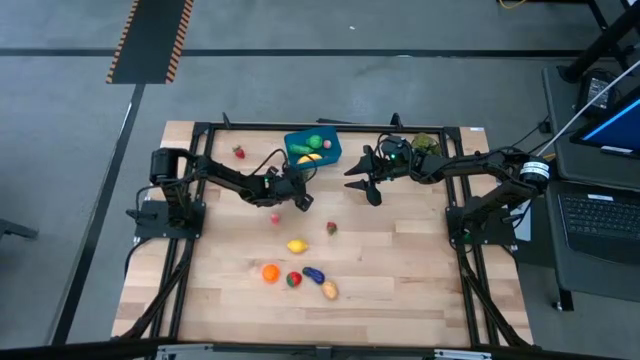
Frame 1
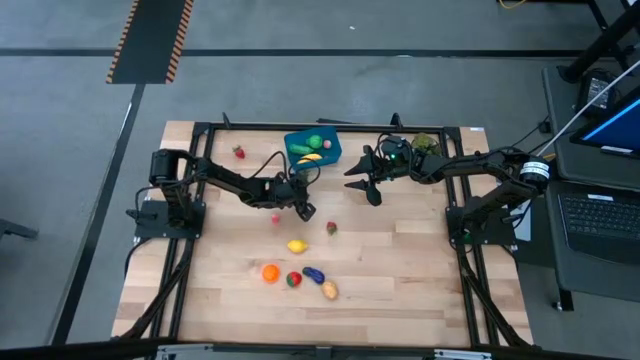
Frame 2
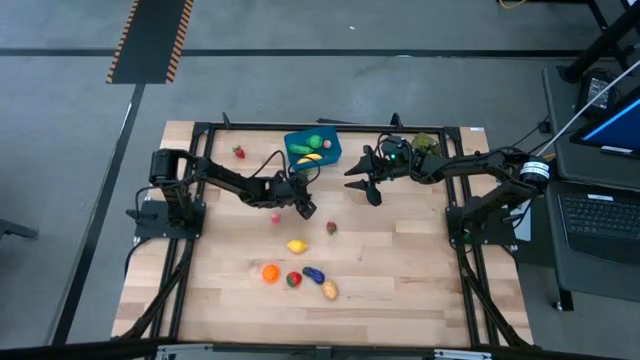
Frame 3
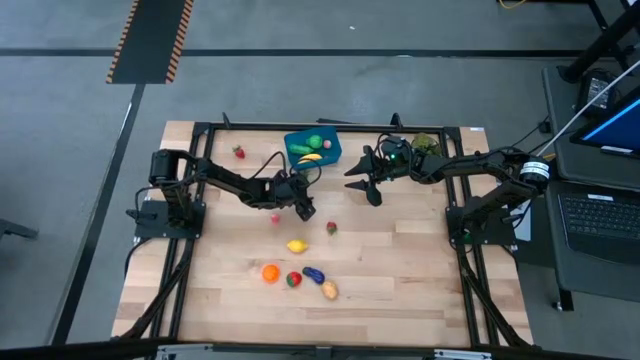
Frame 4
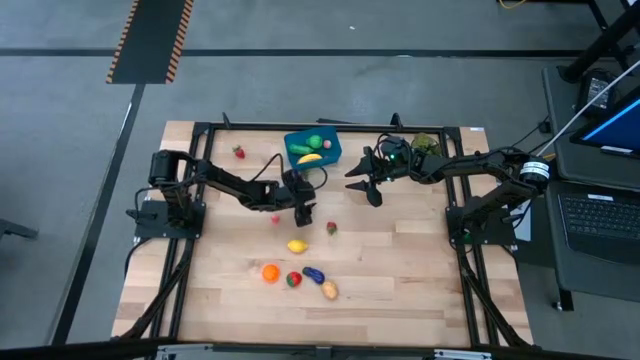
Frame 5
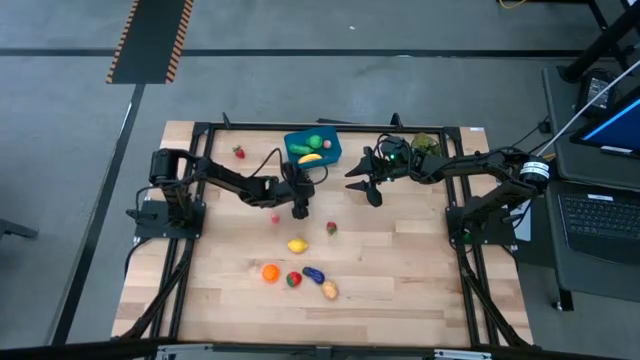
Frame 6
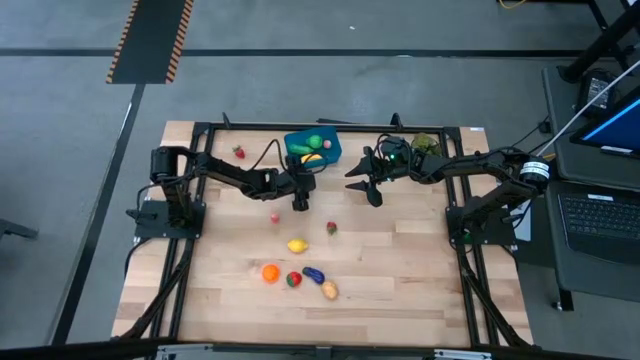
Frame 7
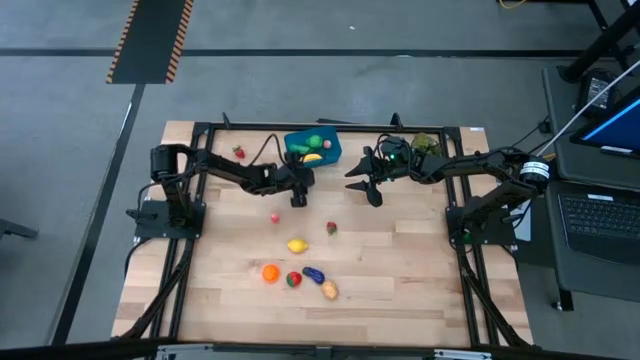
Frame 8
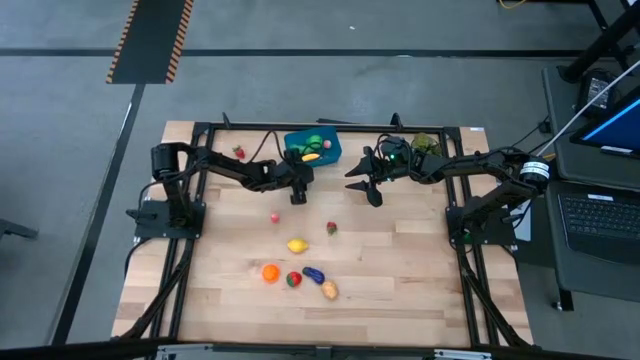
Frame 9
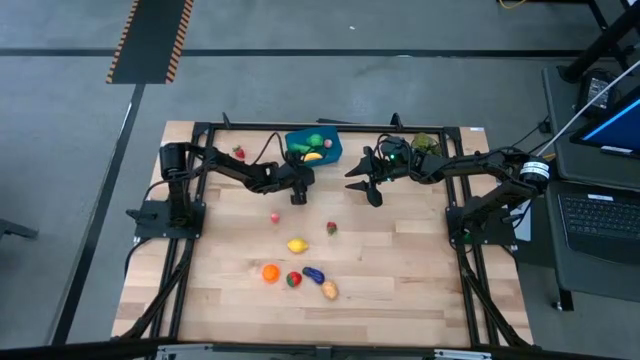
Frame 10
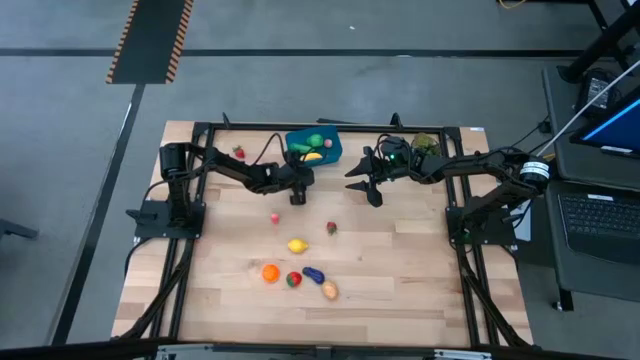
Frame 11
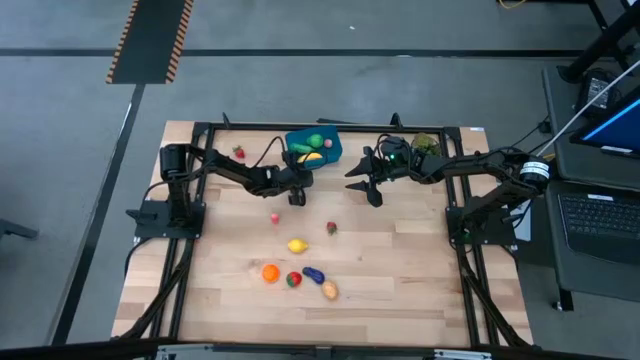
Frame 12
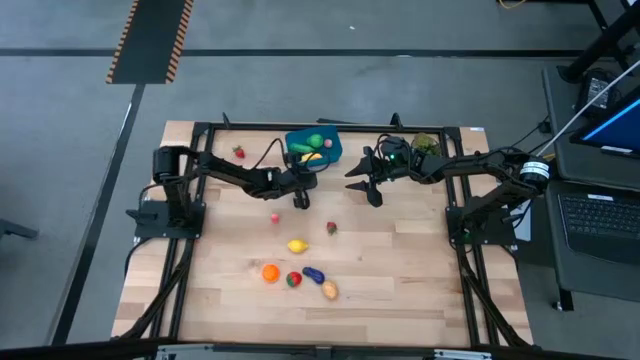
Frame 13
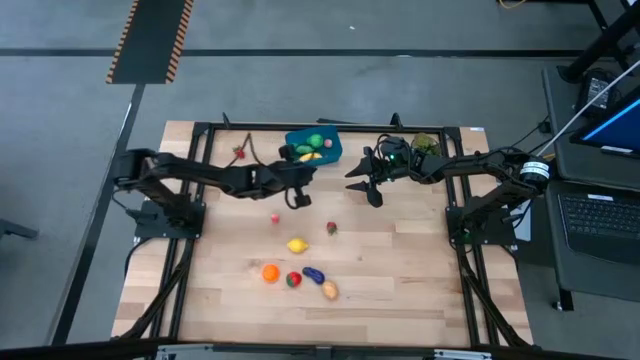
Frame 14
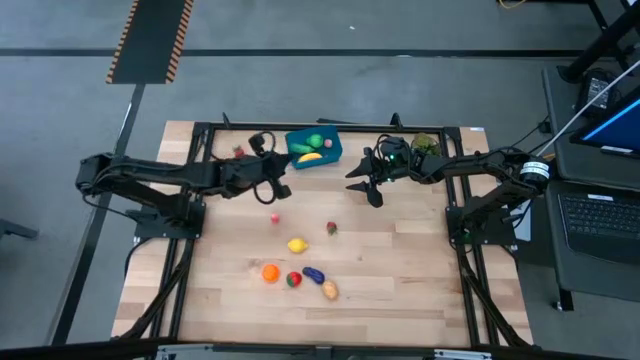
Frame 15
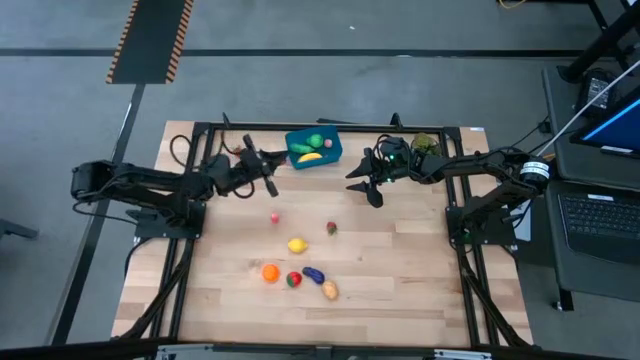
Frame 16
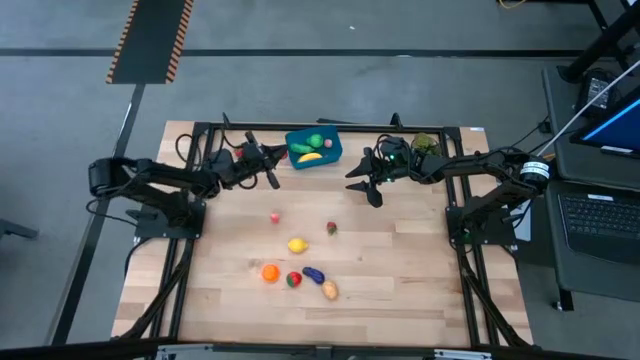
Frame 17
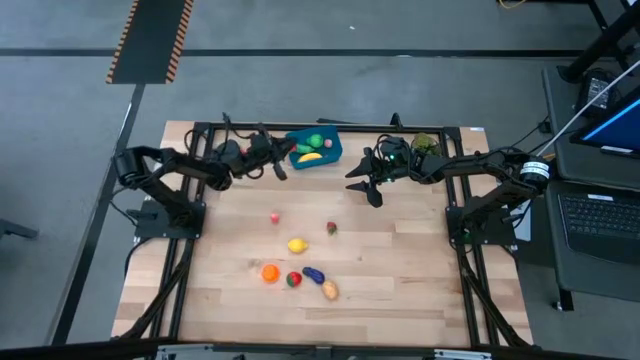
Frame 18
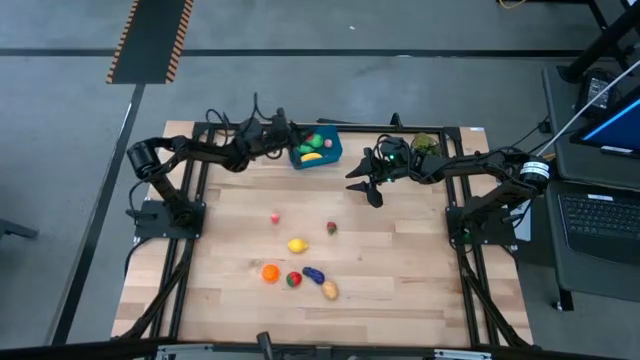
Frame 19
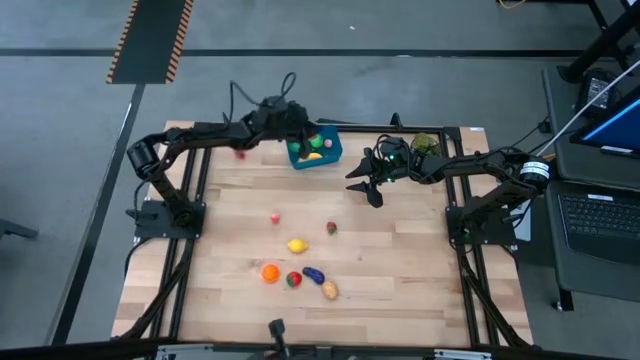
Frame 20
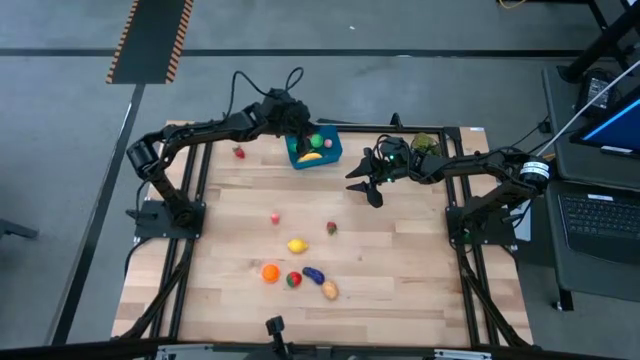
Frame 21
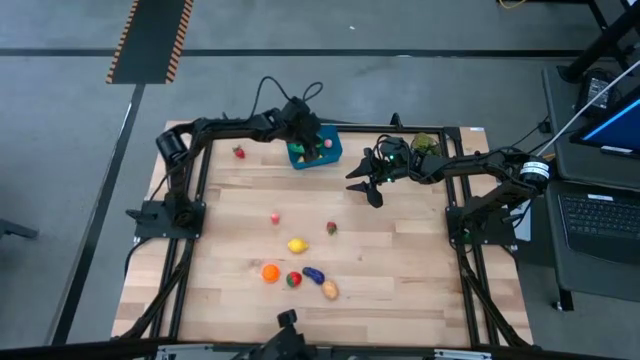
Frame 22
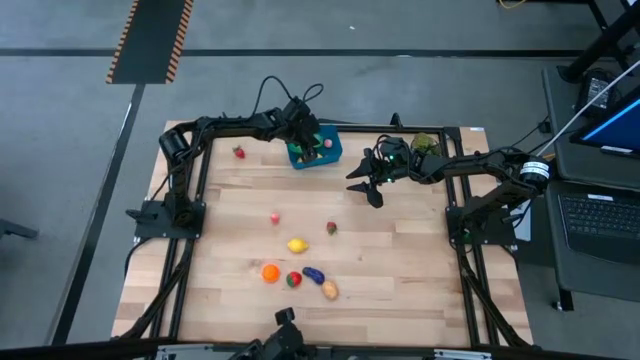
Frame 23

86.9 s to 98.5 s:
Task: Pick and placing Produce into tupperware
Put the strawberry into the blue bin

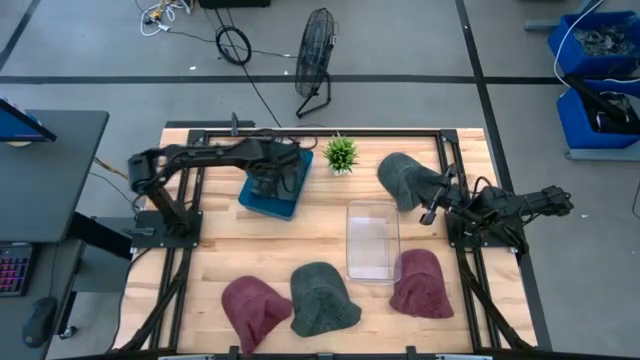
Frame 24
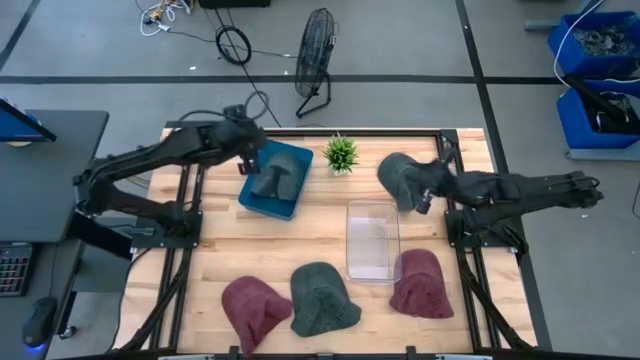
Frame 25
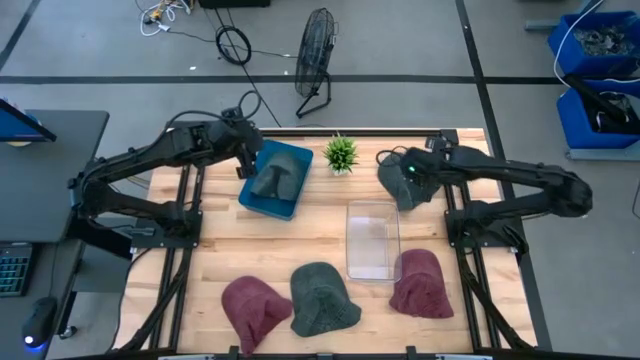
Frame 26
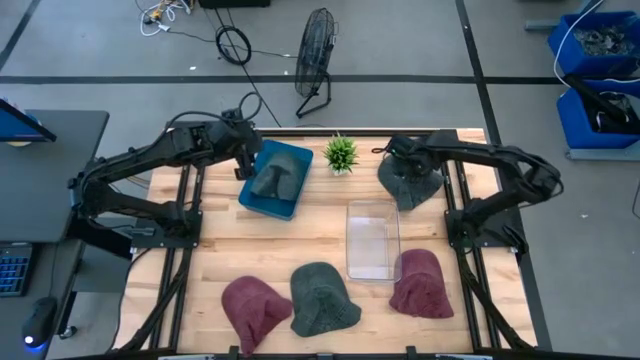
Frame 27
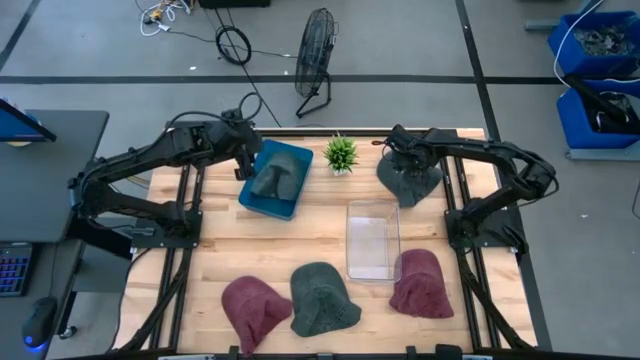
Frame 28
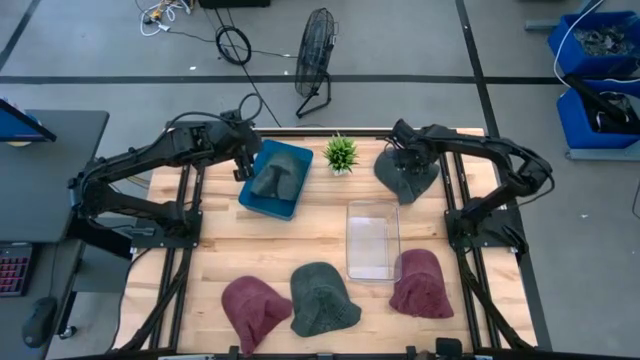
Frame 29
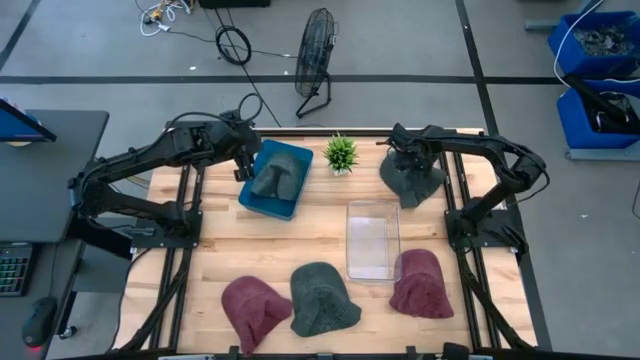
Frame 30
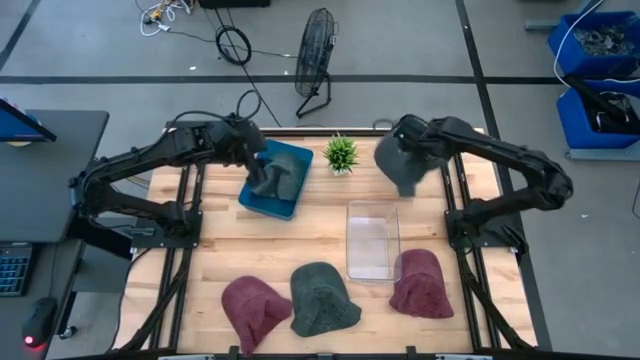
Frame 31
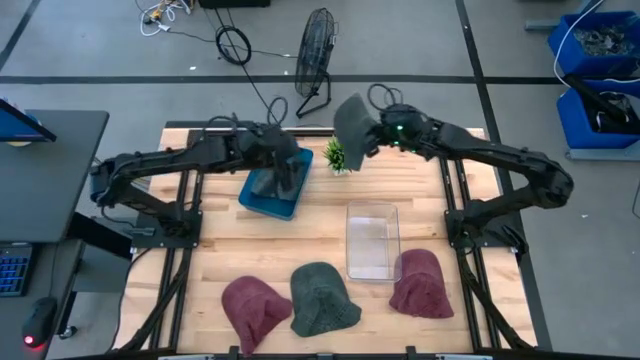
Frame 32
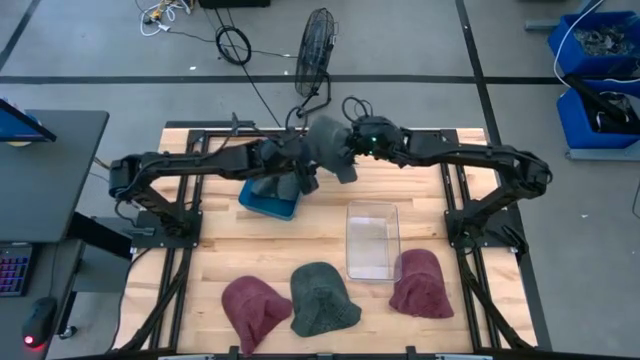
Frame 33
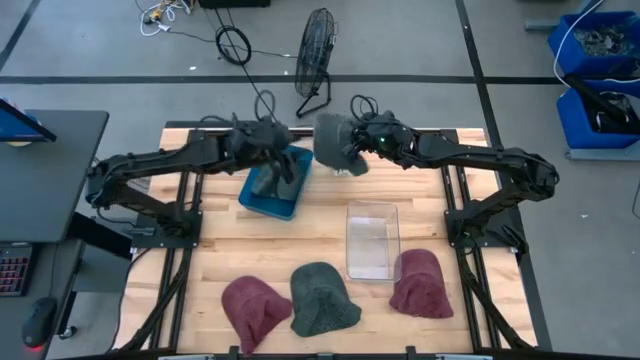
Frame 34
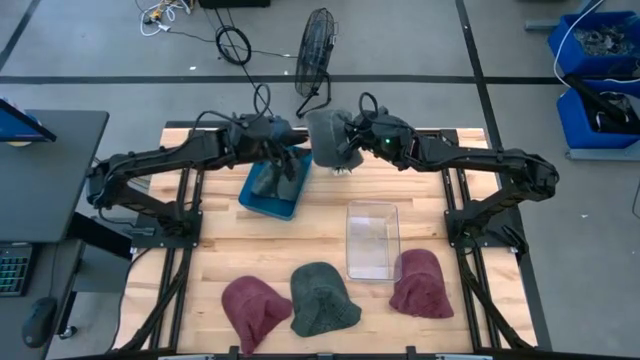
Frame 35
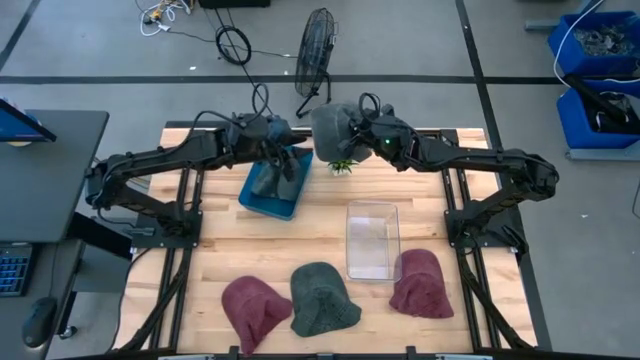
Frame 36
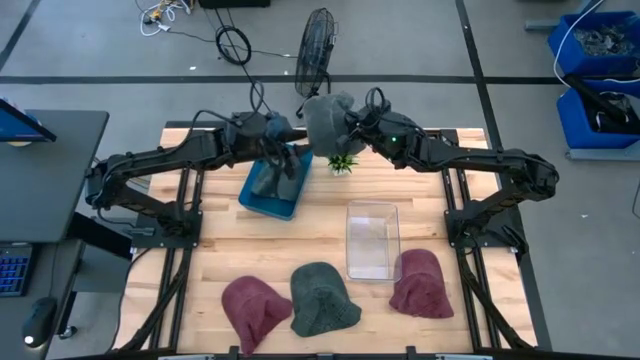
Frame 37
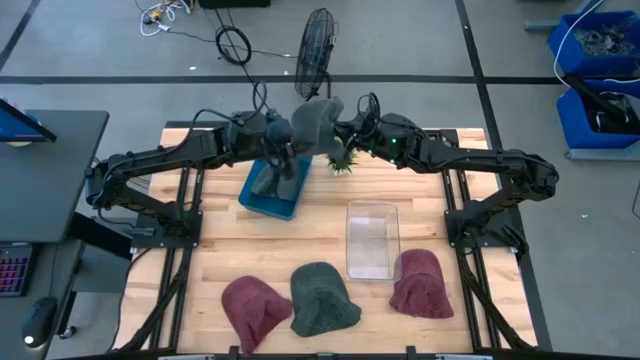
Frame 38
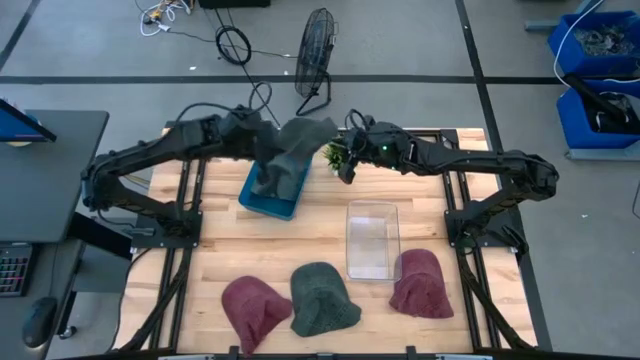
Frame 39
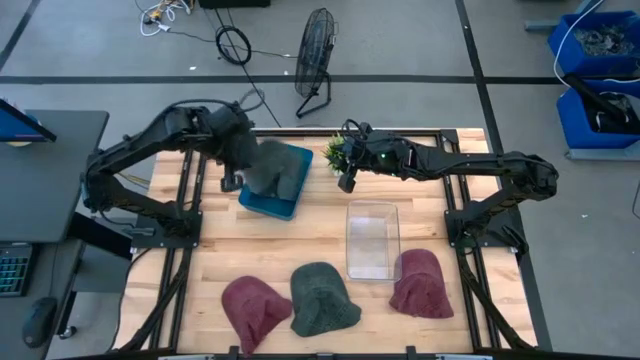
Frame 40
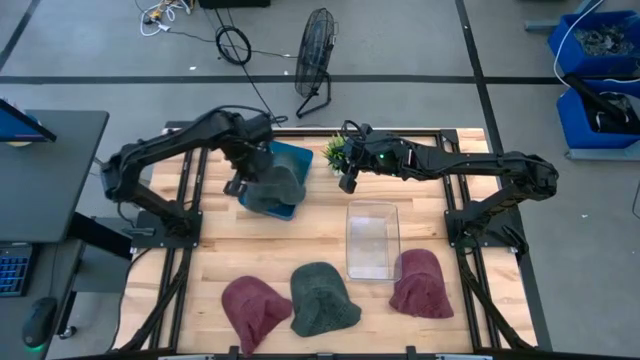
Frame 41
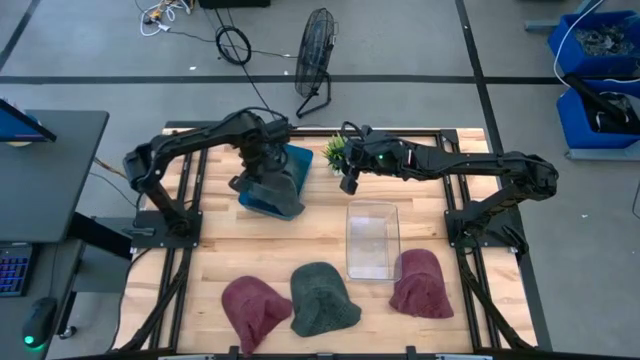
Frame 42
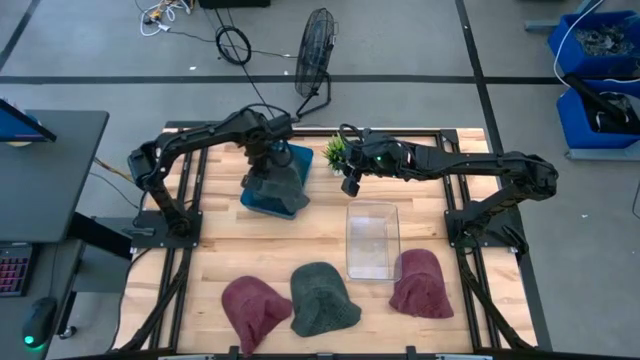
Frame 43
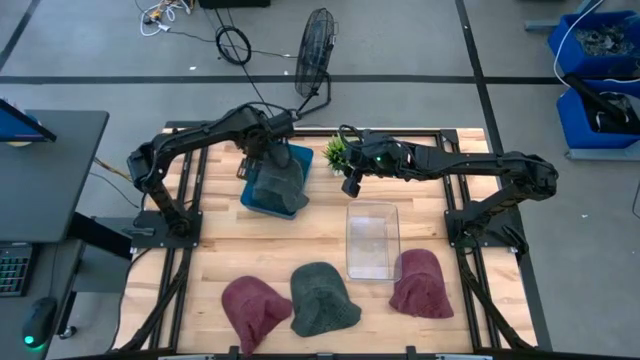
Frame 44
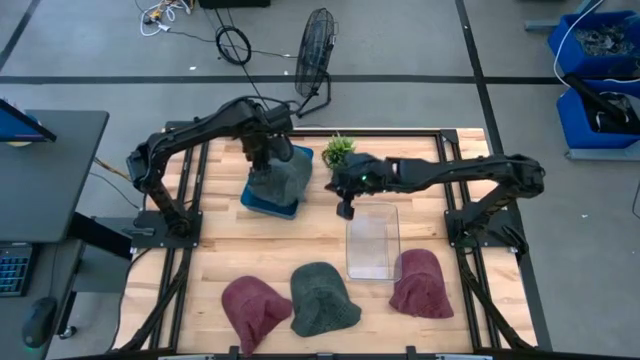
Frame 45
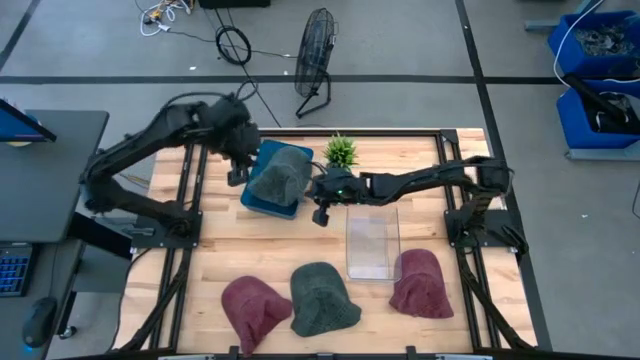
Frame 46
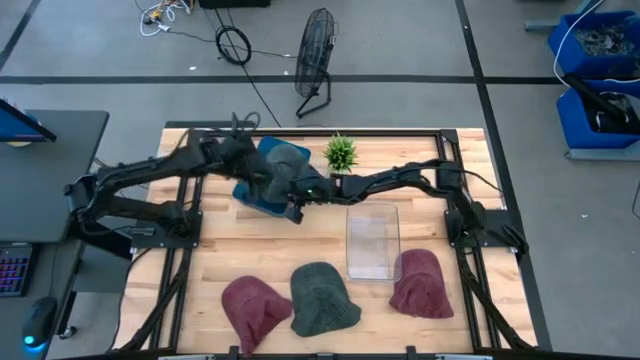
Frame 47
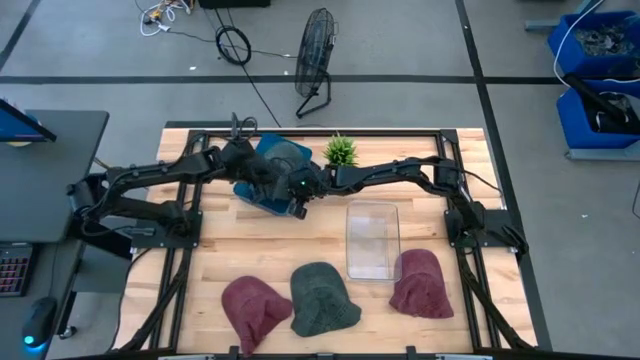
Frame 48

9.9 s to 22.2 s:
Task: Pick & Place hat
Put the top black cap into the blue bin
